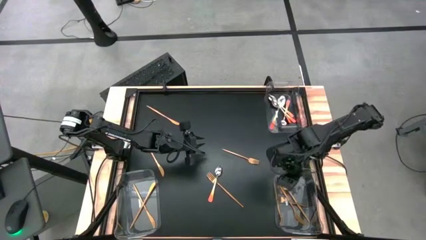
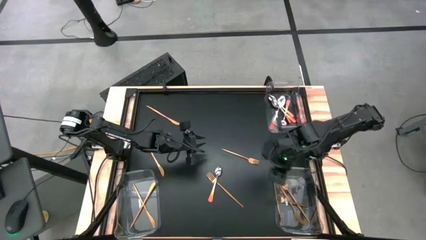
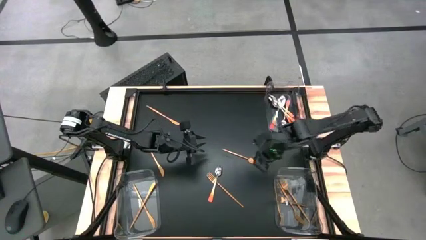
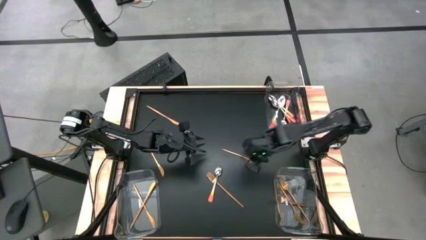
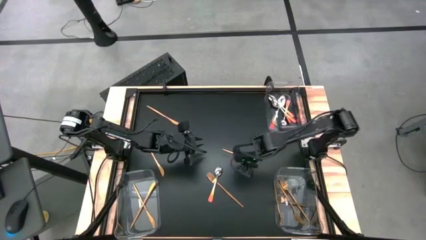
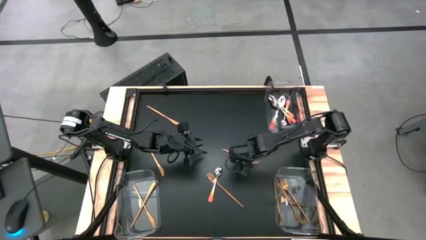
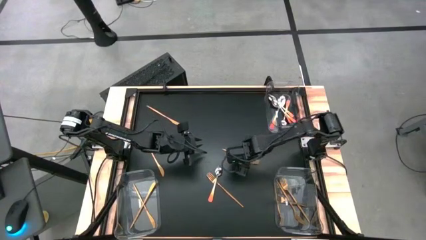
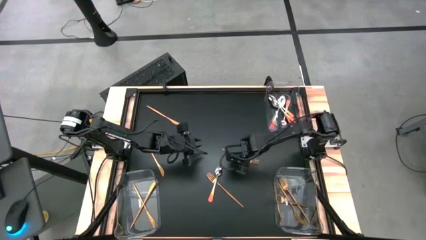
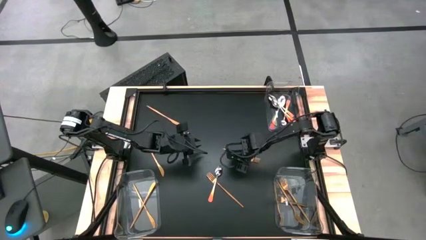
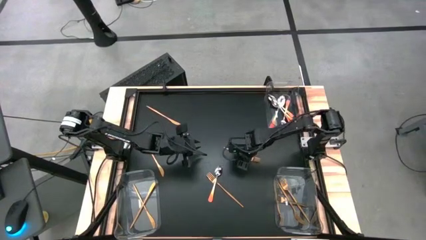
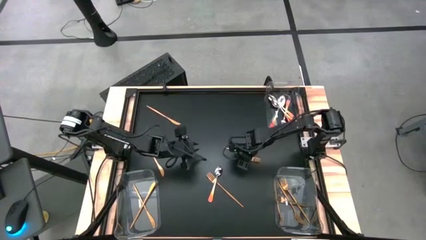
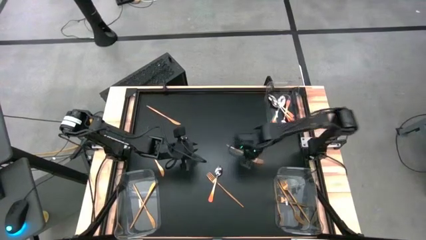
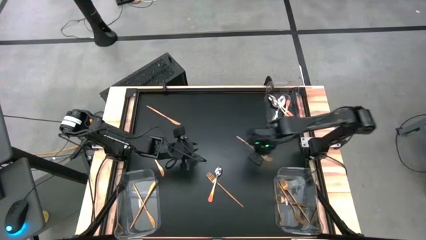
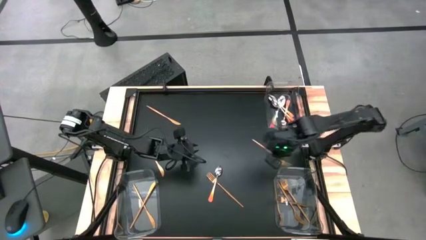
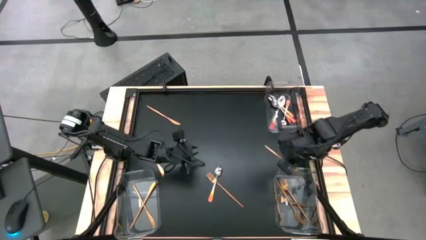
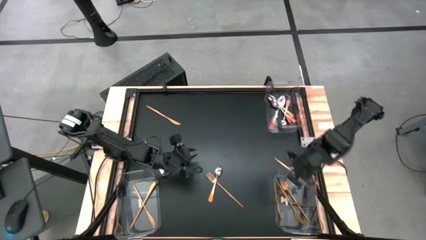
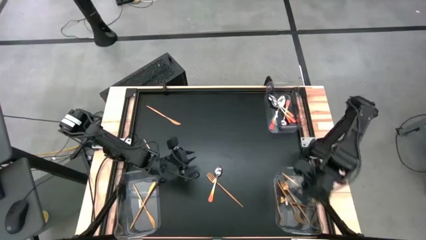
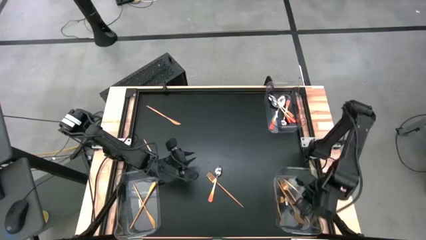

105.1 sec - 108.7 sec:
Task: Sort silverware by color (type)
Put the gold fork into the bottom right transparent bin

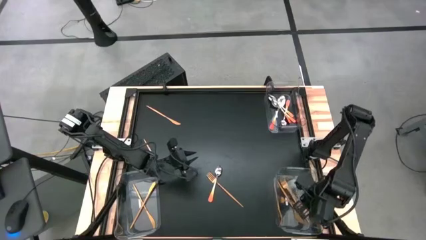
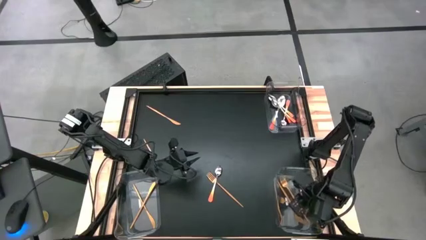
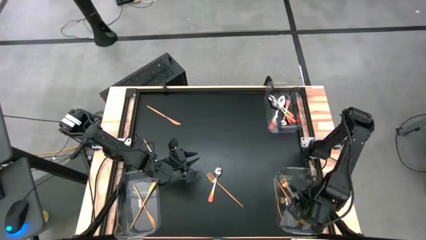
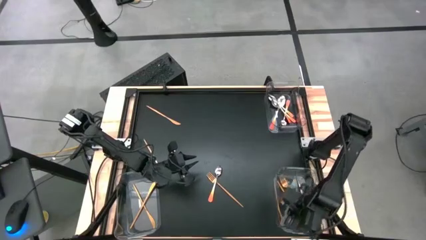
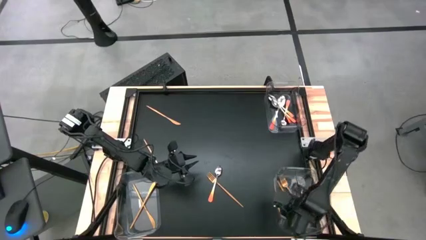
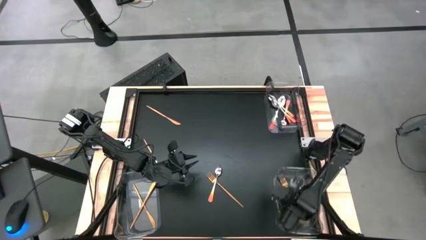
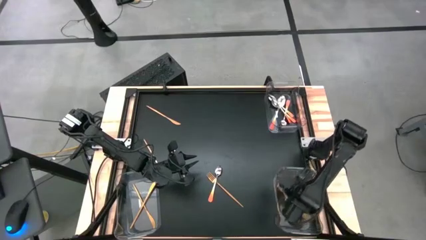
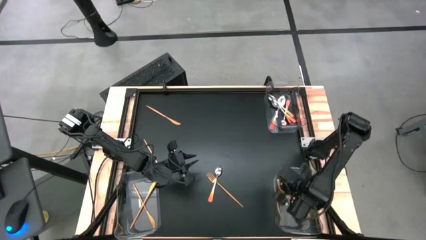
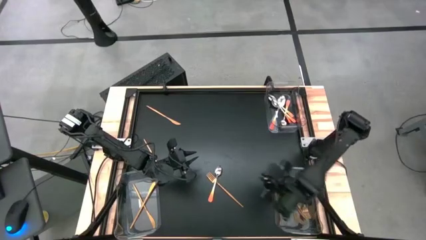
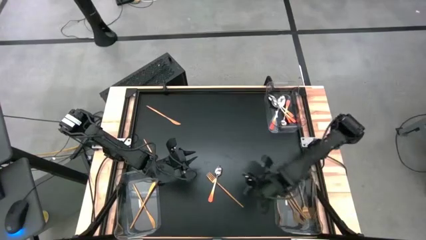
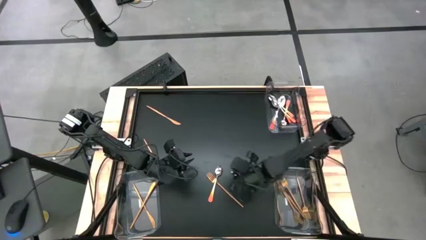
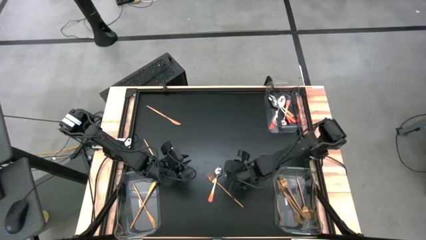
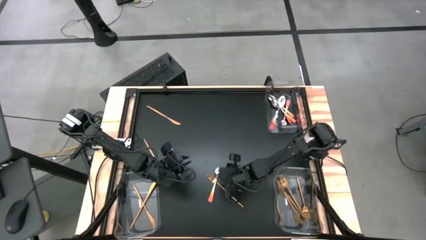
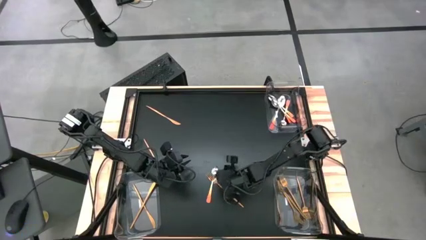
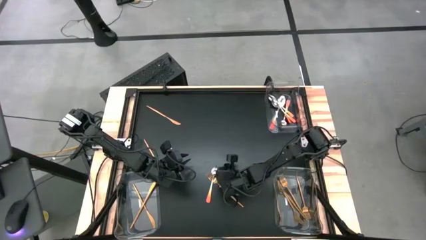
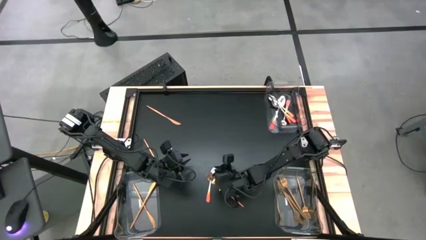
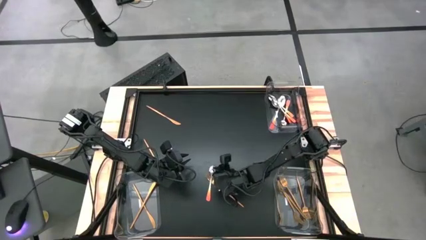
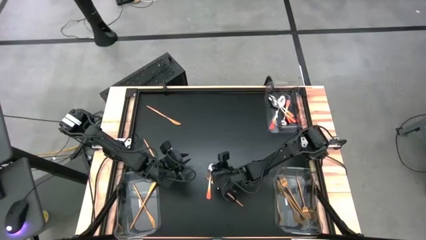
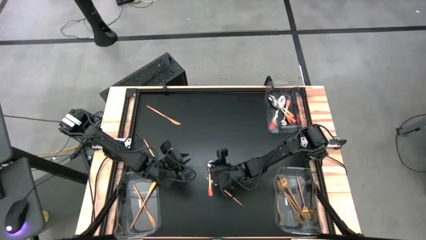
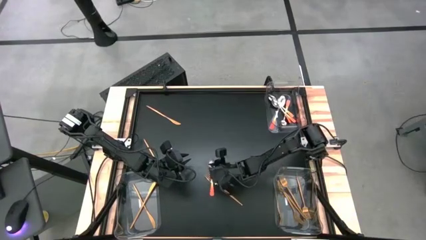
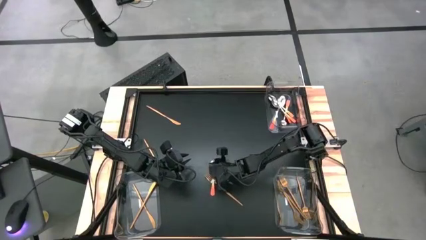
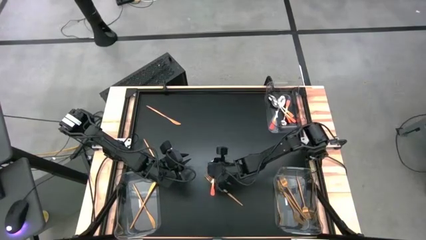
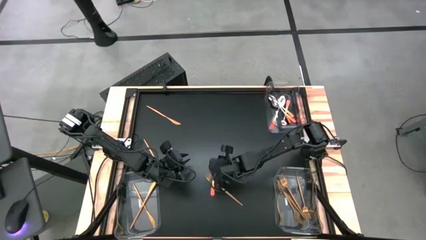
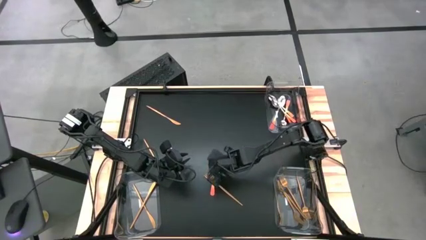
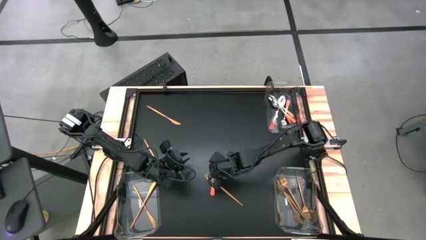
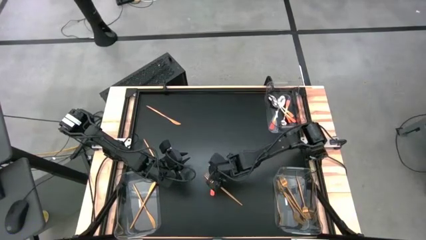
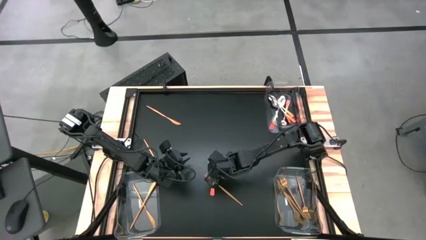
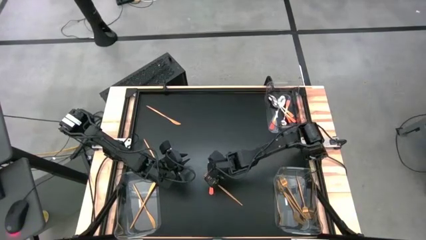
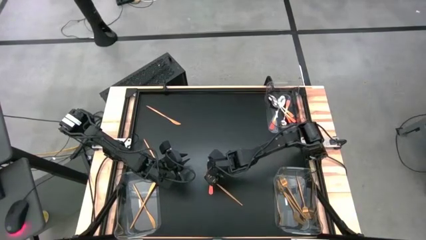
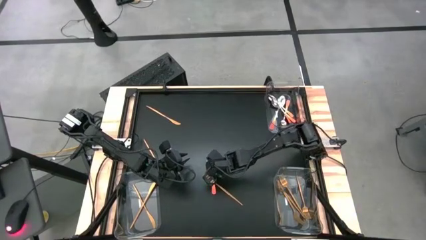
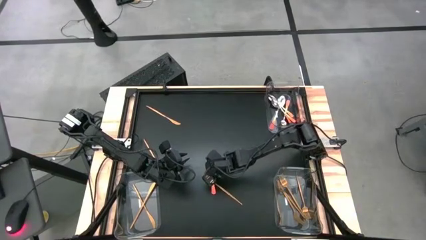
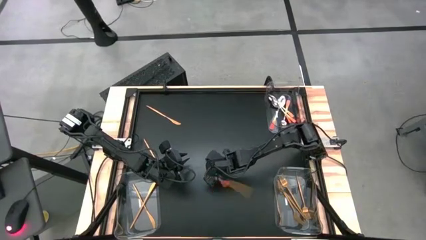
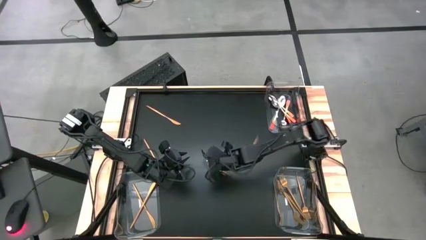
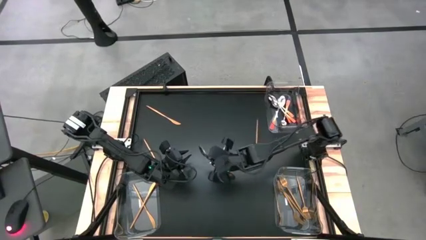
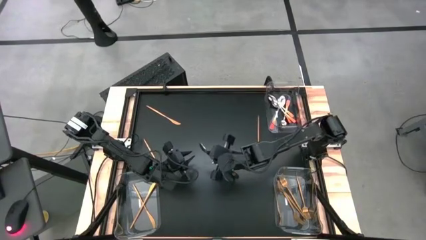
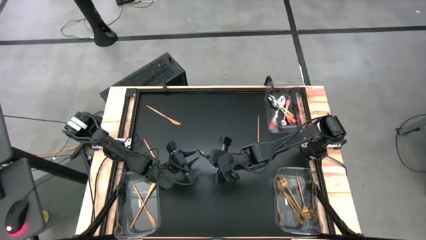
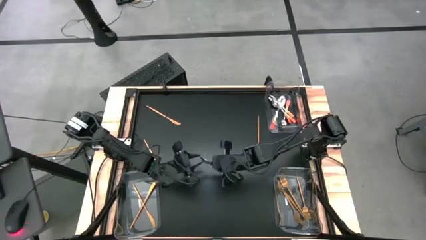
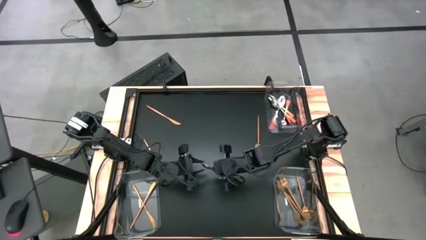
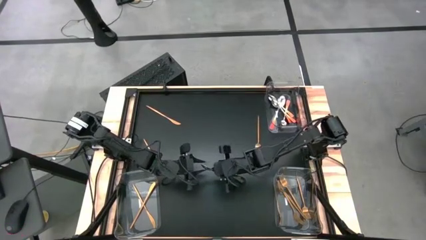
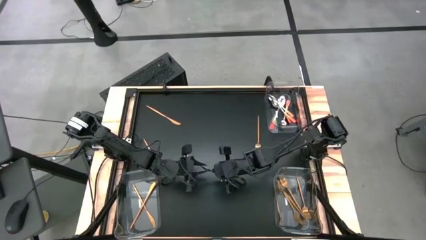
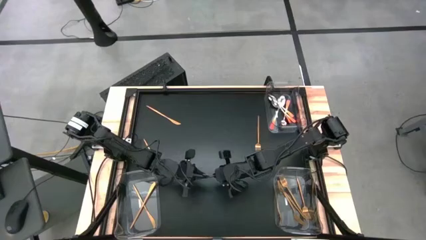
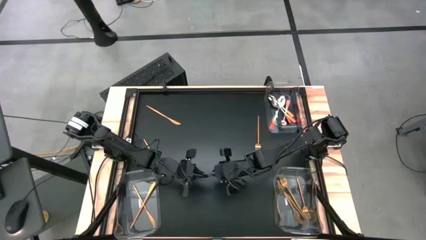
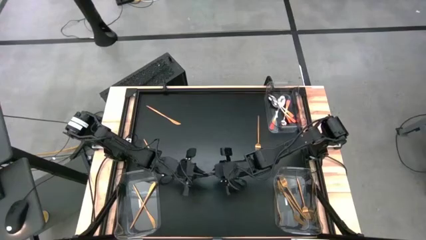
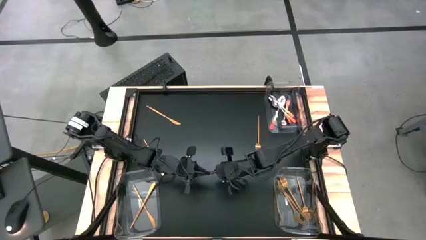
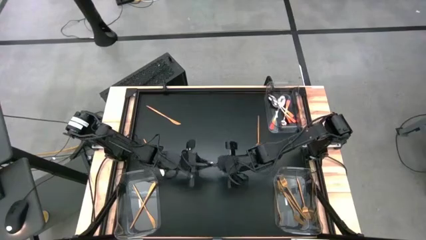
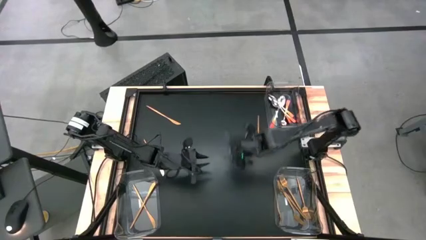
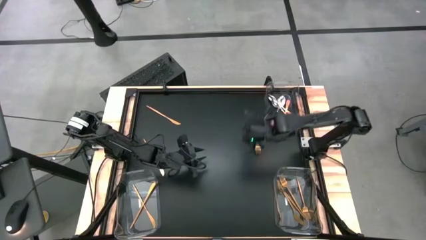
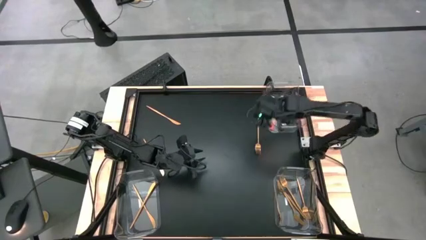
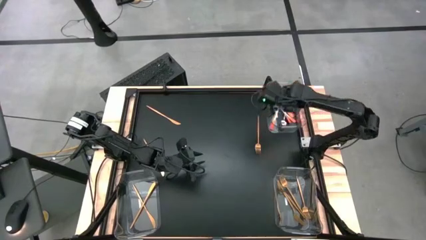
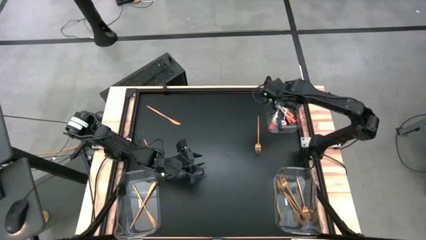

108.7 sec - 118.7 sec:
Put the orange spoon into the top right transparent bin
